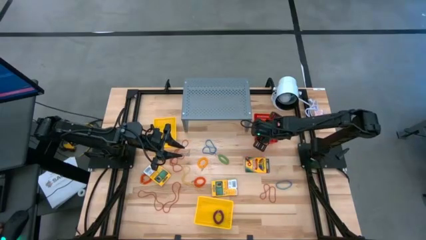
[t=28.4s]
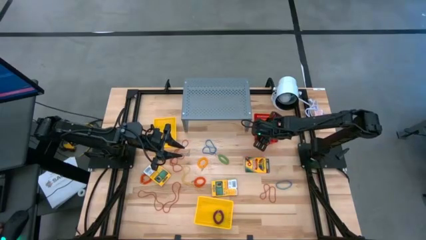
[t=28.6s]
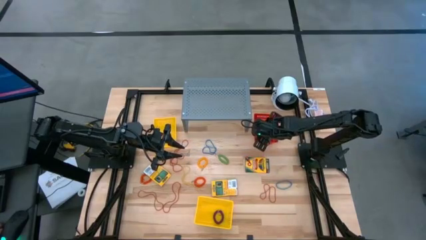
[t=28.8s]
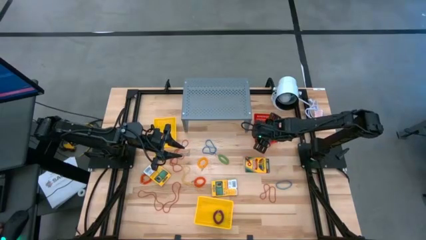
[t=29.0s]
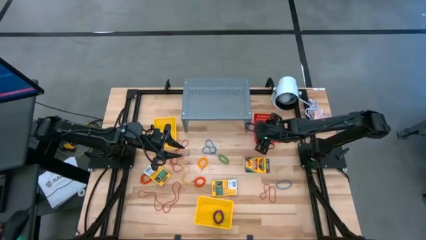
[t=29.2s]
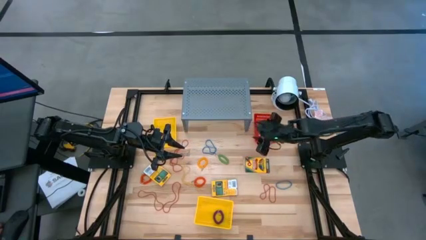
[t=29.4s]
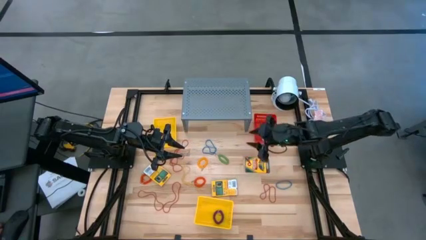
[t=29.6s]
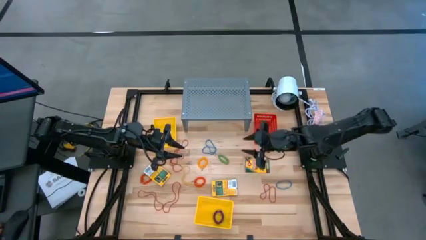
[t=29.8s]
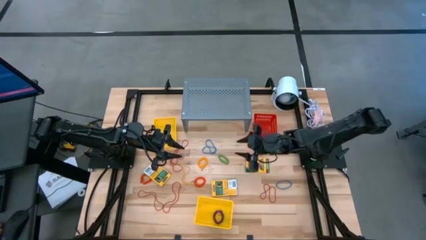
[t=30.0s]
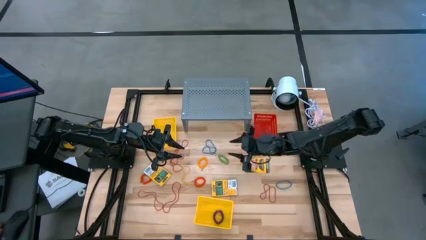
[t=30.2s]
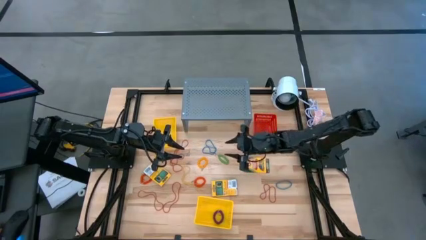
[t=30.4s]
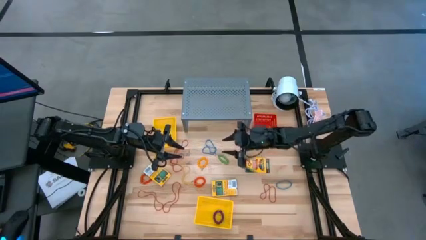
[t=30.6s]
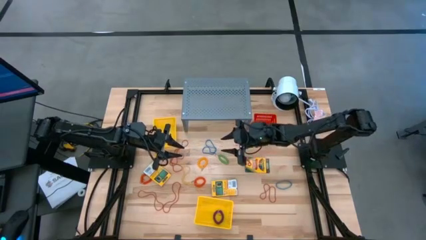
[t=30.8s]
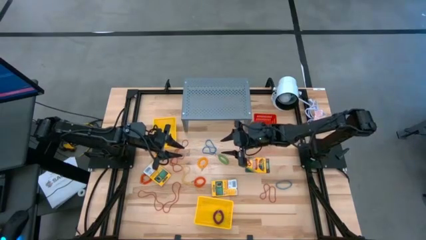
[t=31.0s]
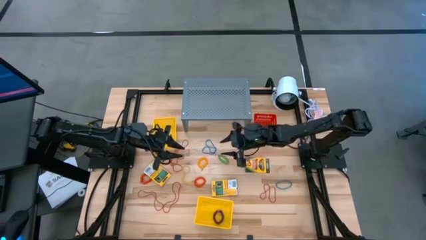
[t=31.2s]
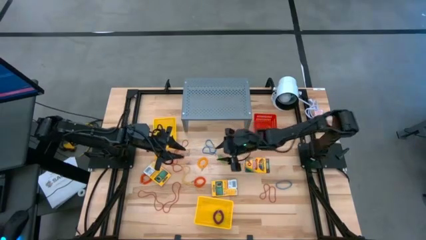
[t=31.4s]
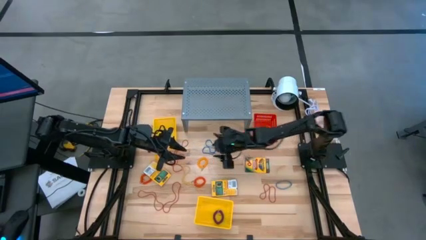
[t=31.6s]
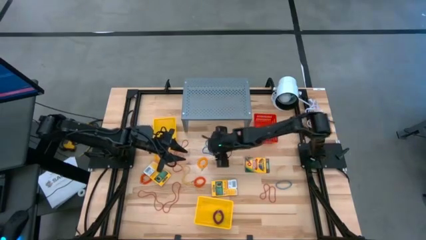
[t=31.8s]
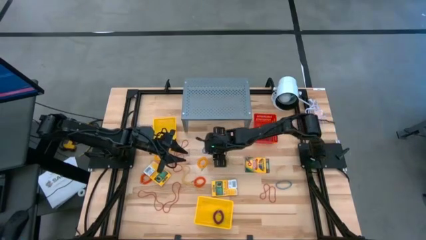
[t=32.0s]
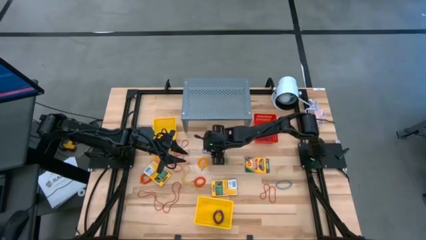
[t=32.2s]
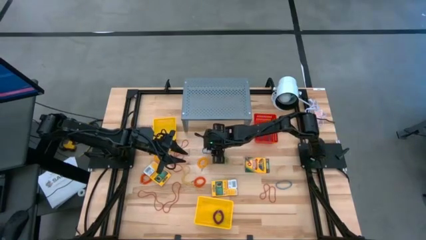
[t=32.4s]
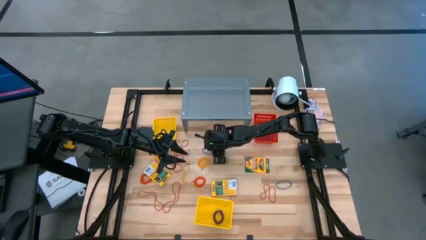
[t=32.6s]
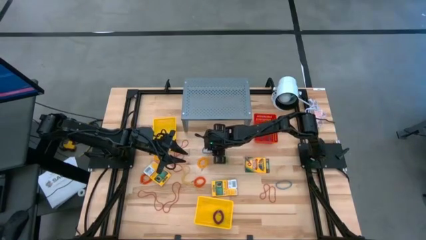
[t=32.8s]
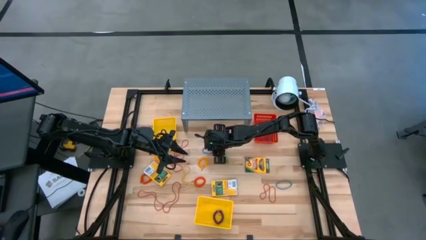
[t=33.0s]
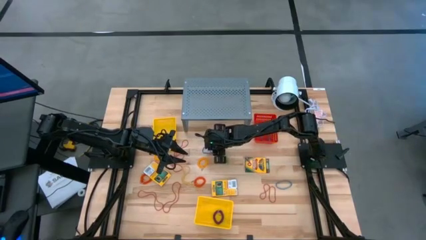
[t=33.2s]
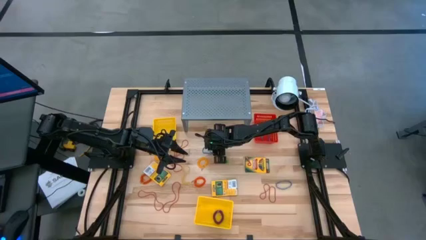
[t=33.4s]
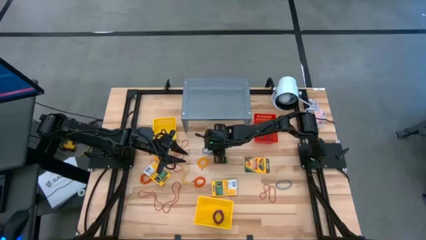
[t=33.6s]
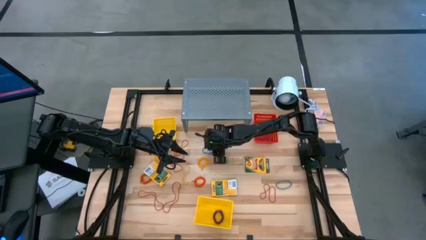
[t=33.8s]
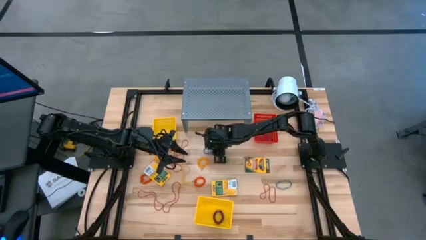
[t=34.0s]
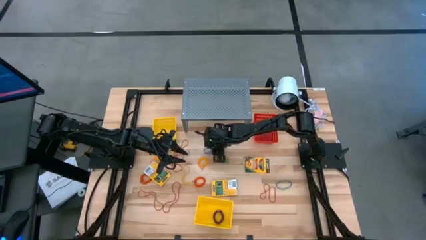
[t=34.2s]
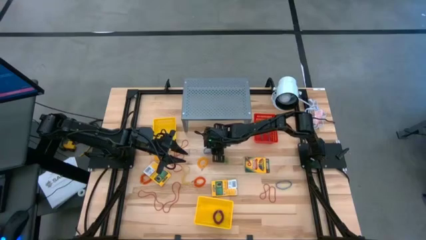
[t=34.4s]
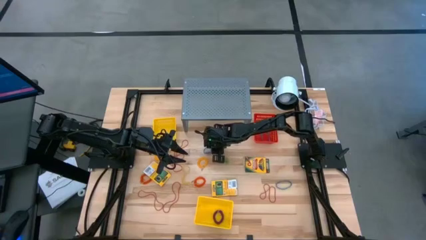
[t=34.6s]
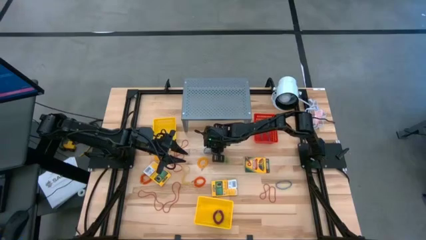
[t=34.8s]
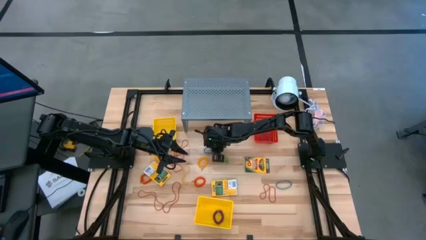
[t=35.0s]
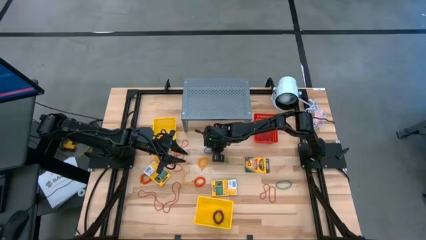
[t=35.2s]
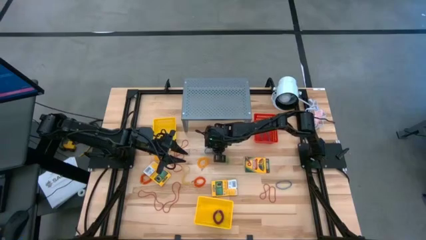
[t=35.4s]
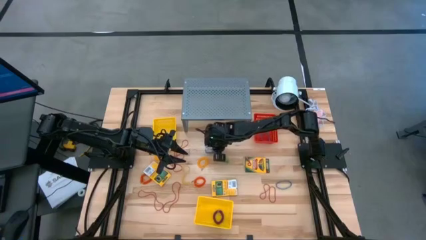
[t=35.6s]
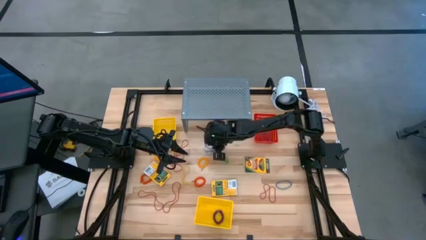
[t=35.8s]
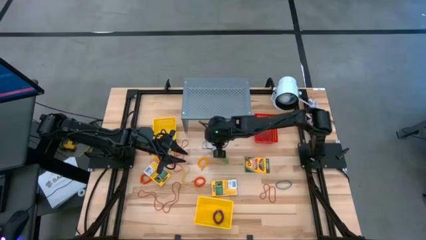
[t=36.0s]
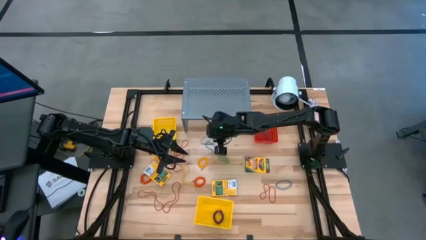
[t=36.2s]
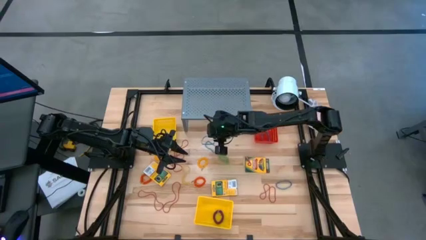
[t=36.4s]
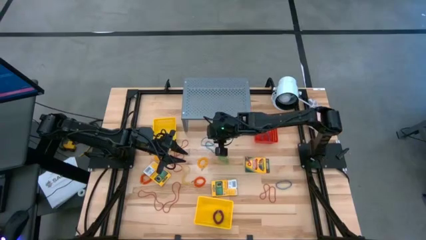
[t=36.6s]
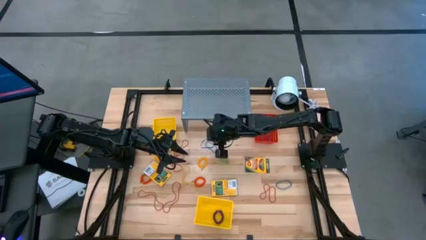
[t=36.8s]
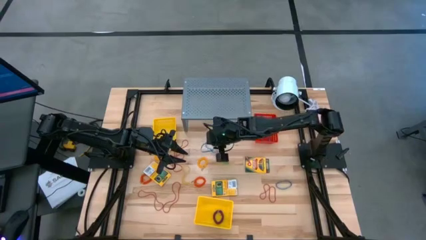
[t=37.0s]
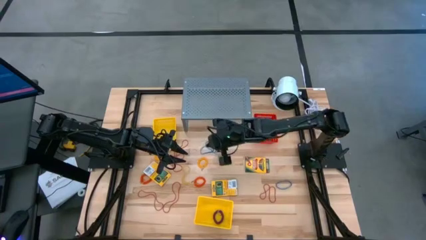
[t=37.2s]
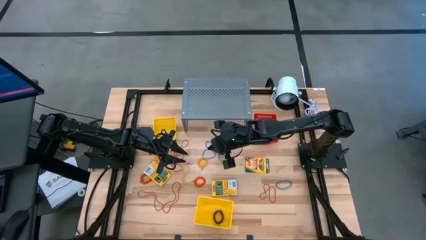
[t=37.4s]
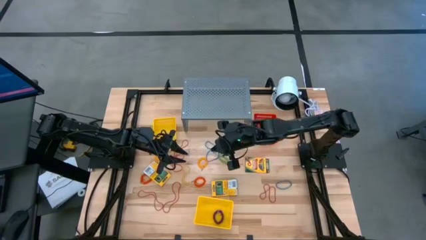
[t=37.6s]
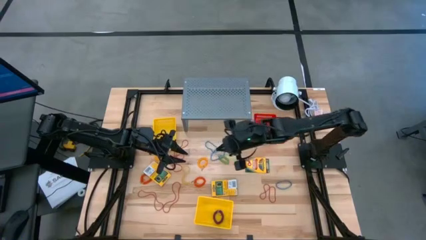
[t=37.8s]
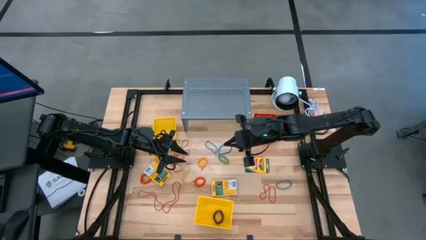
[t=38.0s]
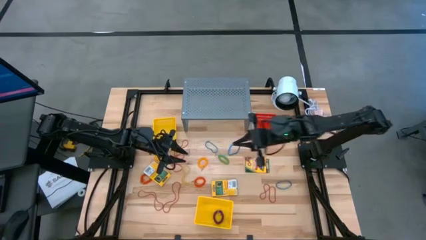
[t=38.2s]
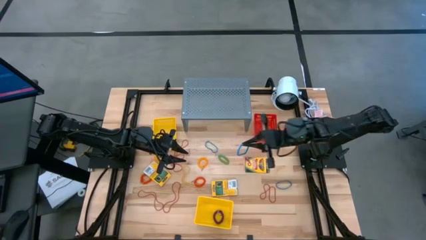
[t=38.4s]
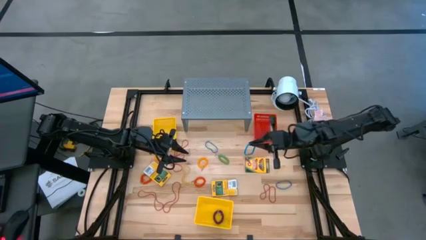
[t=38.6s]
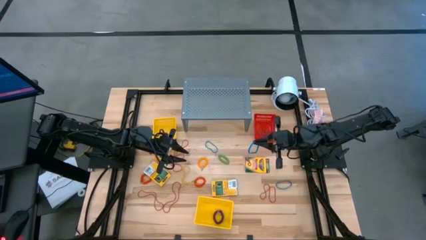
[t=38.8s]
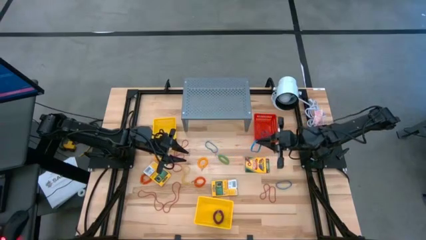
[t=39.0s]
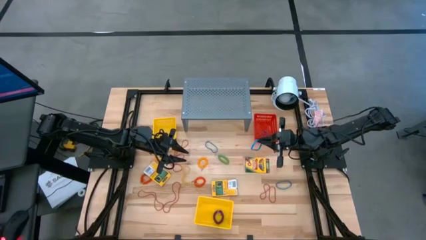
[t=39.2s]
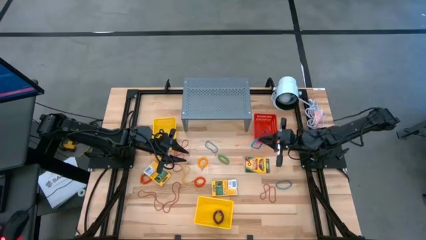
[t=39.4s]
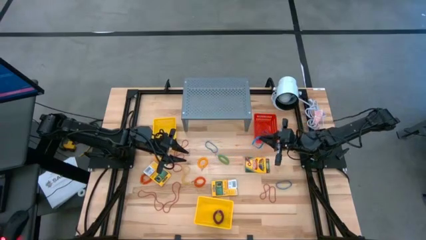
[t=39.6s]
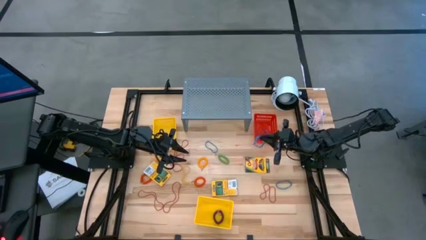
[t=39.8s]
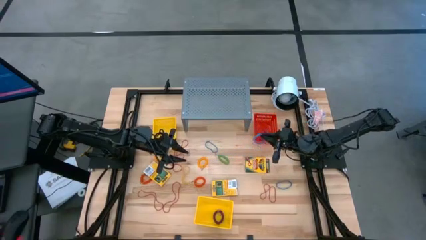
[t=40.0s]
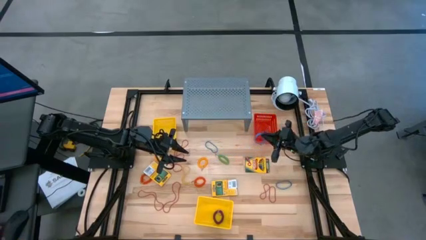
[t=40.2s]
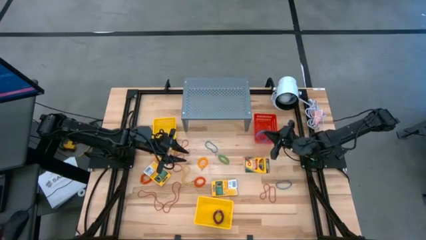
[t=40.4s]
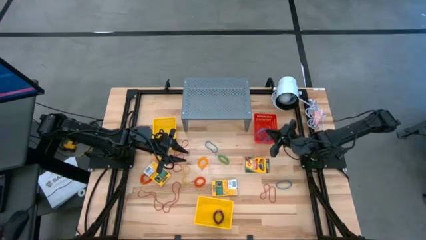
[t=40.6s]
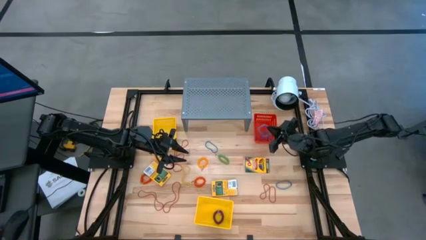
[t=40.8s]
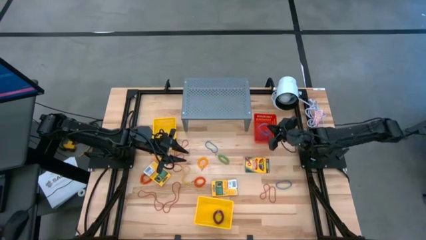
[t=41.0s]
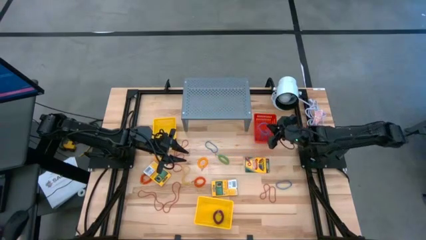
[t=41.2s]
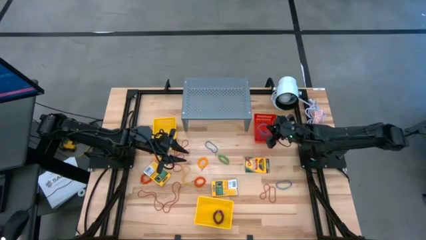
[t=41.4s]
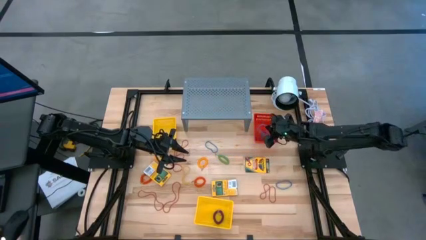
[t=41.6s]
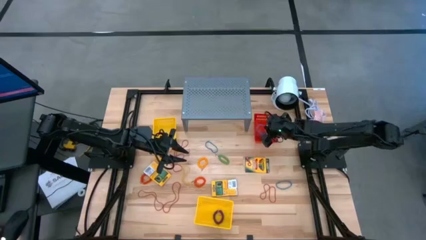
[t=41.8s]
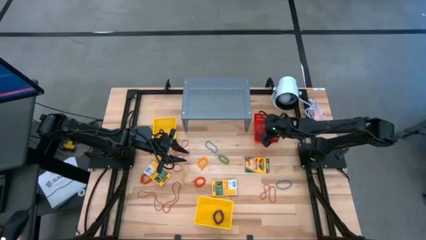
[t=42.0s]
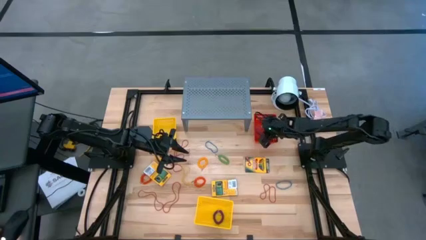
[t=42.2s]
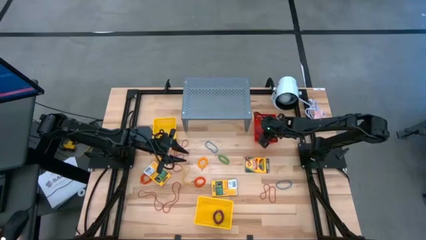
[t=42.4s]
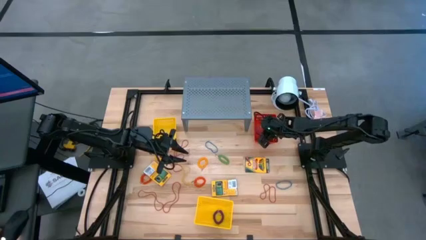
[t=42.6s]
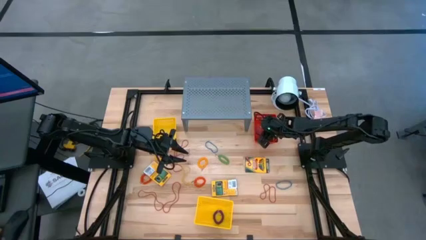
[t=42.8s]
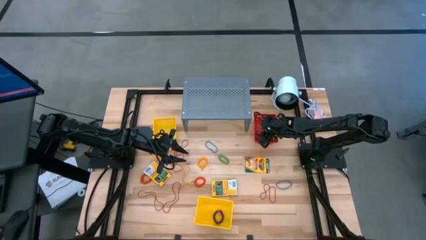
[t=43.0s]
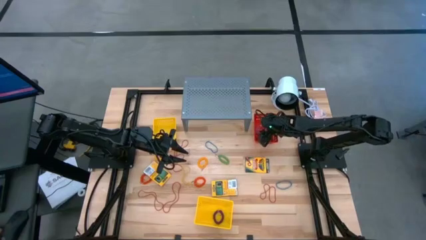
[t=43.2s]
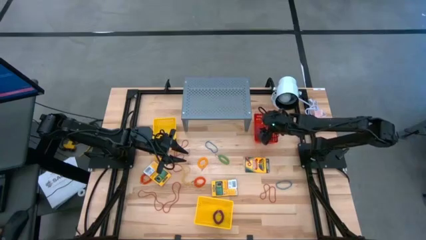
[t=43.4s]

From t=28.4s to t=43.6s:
Task: Pick & Place Office Desk Supplies
Put the blue rubber band into the red bin
